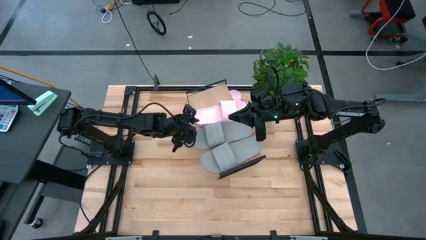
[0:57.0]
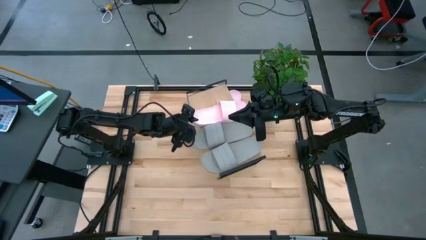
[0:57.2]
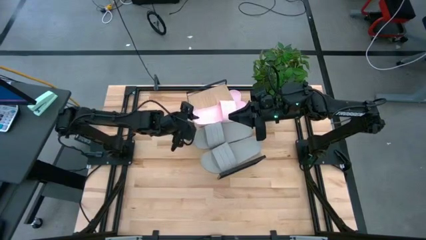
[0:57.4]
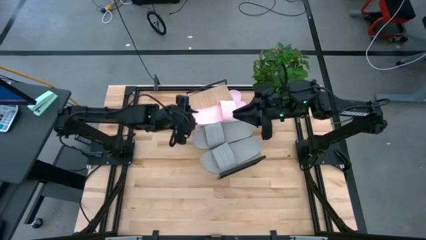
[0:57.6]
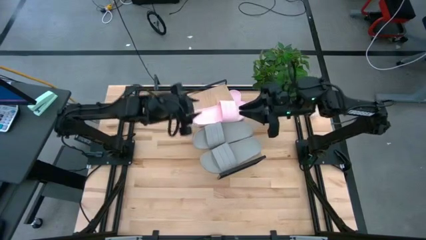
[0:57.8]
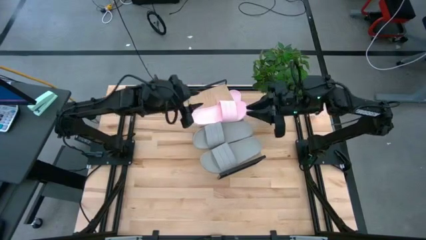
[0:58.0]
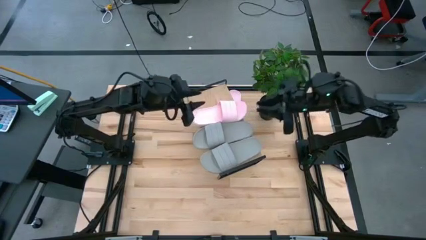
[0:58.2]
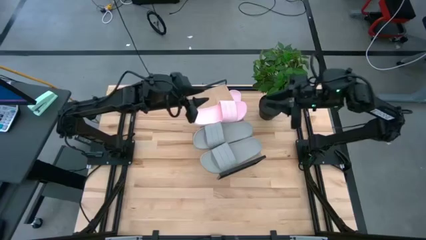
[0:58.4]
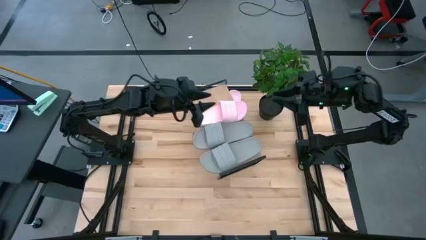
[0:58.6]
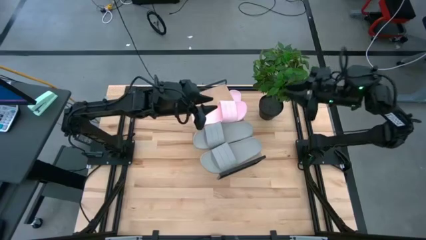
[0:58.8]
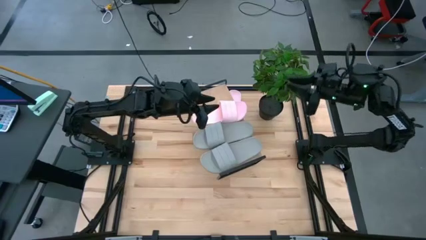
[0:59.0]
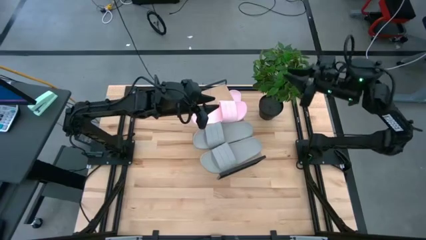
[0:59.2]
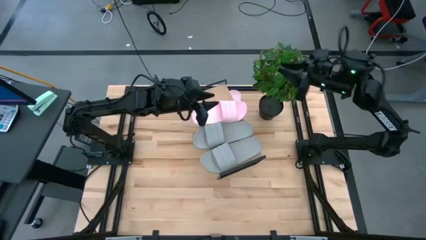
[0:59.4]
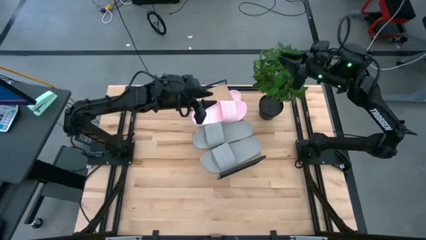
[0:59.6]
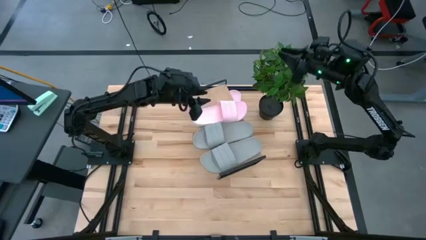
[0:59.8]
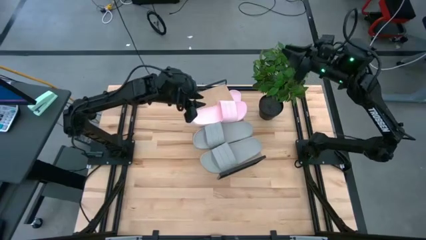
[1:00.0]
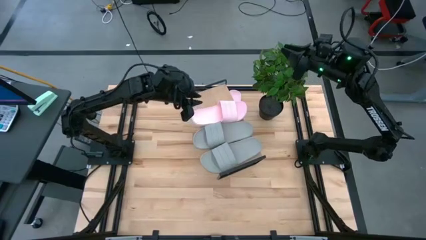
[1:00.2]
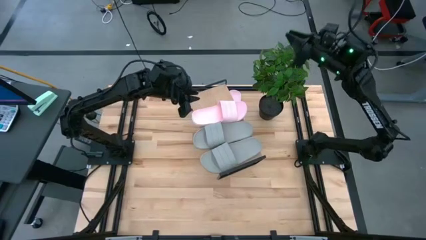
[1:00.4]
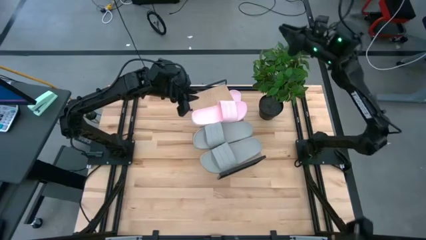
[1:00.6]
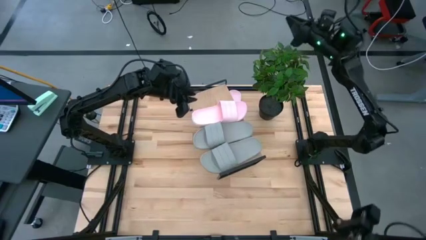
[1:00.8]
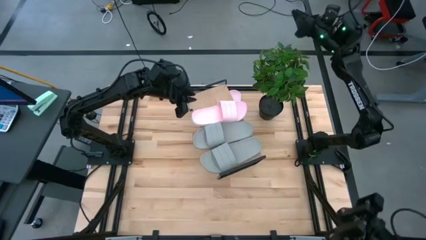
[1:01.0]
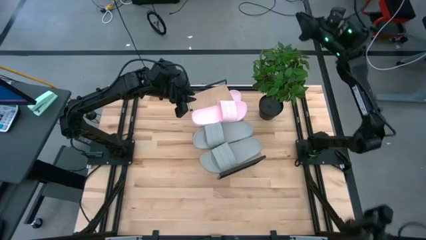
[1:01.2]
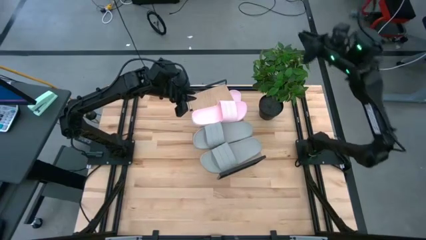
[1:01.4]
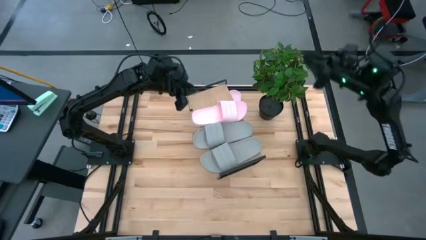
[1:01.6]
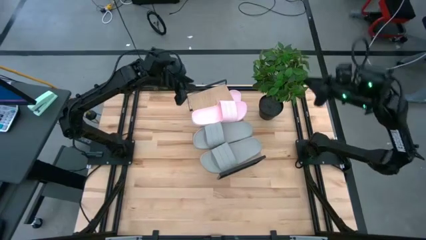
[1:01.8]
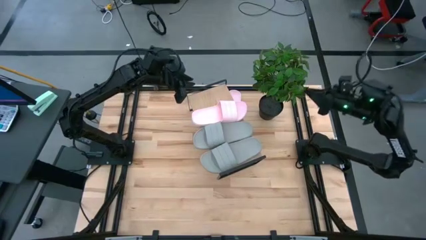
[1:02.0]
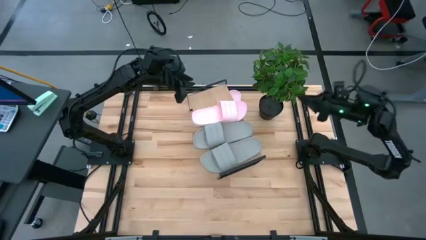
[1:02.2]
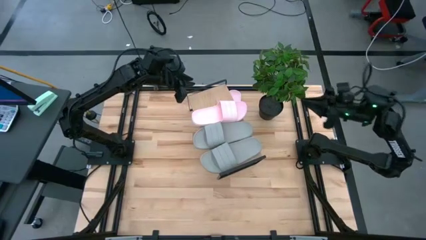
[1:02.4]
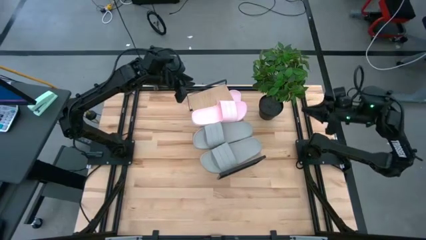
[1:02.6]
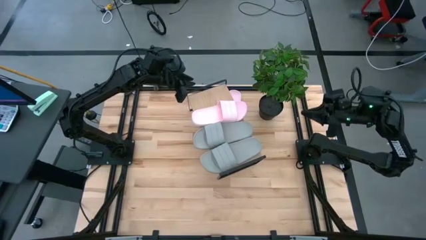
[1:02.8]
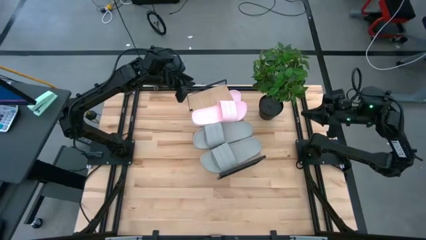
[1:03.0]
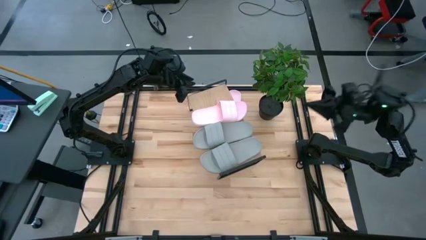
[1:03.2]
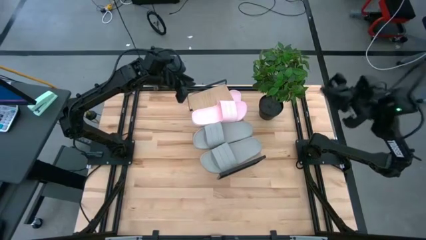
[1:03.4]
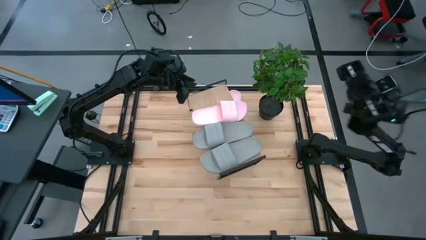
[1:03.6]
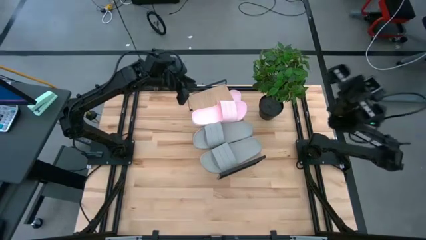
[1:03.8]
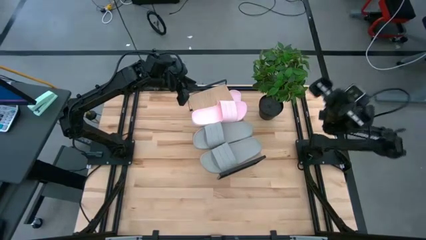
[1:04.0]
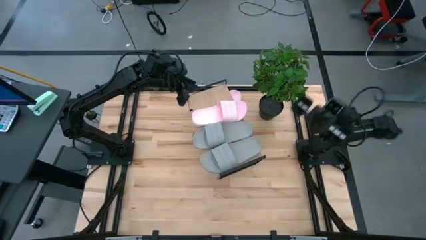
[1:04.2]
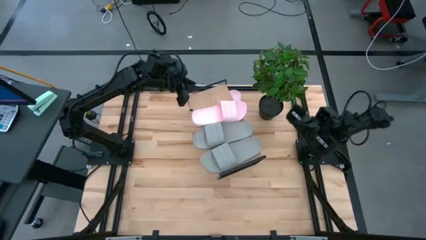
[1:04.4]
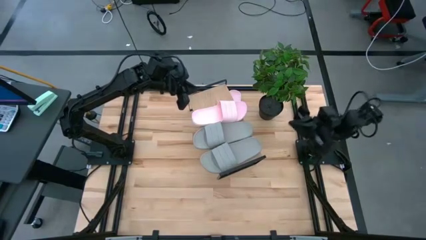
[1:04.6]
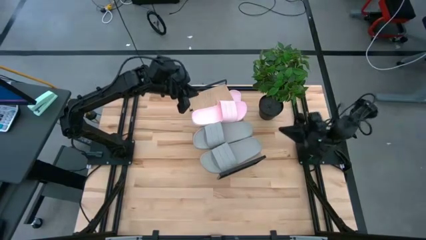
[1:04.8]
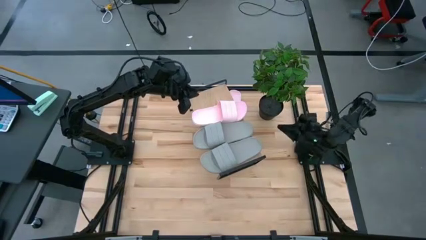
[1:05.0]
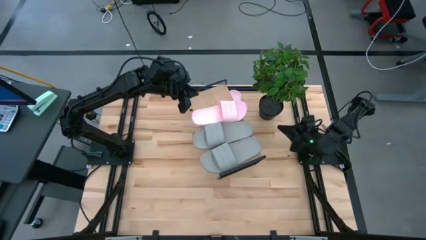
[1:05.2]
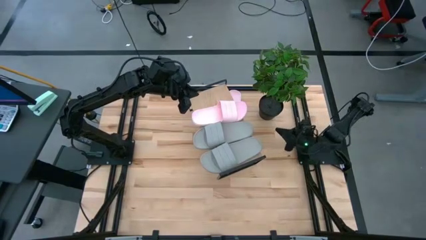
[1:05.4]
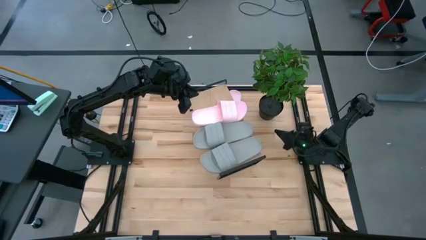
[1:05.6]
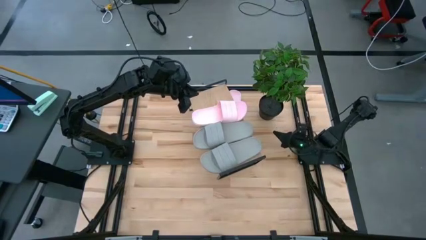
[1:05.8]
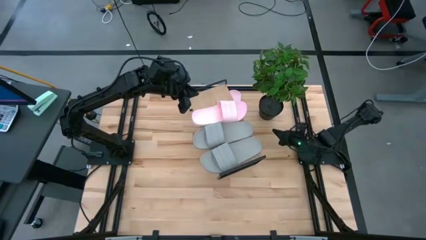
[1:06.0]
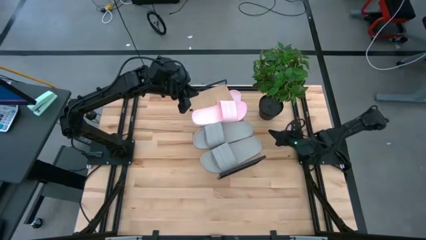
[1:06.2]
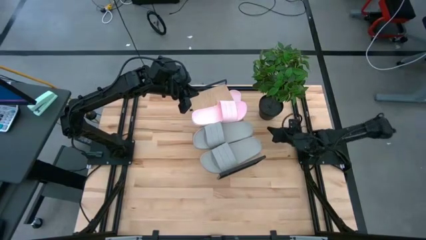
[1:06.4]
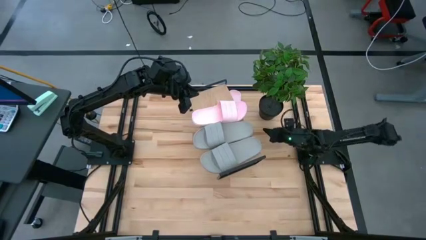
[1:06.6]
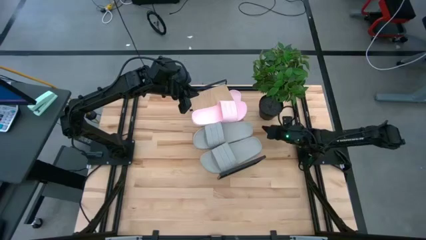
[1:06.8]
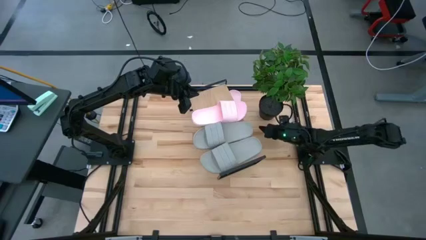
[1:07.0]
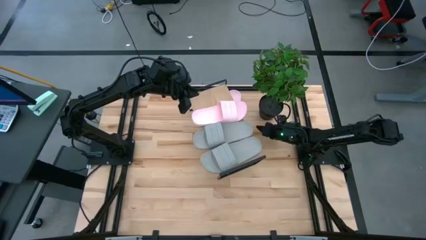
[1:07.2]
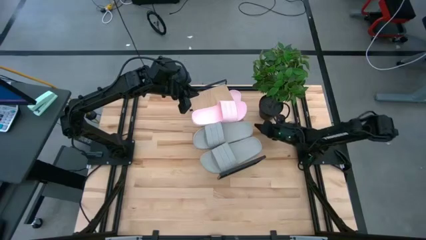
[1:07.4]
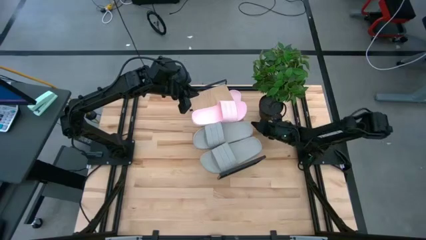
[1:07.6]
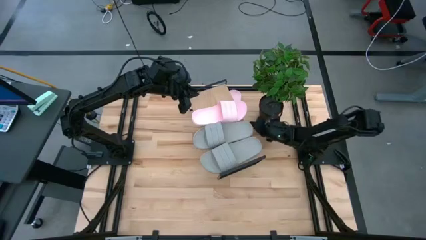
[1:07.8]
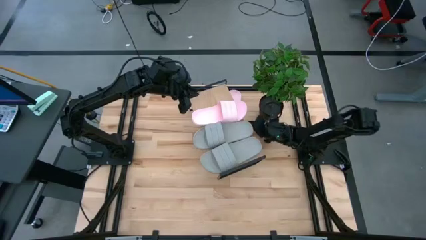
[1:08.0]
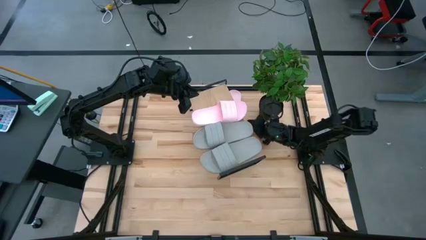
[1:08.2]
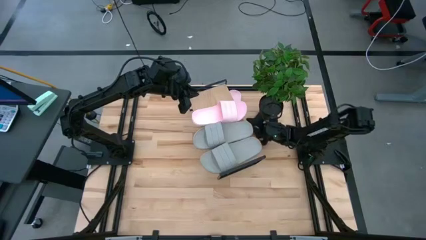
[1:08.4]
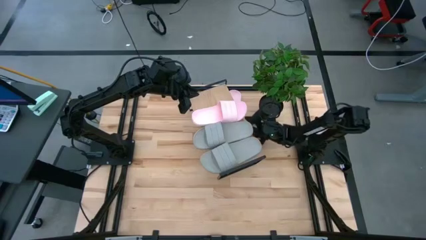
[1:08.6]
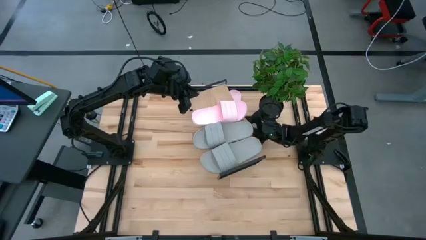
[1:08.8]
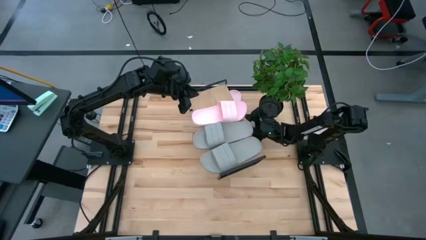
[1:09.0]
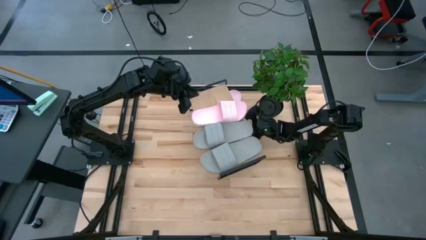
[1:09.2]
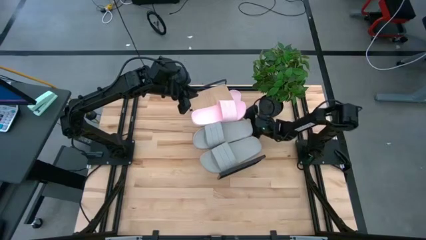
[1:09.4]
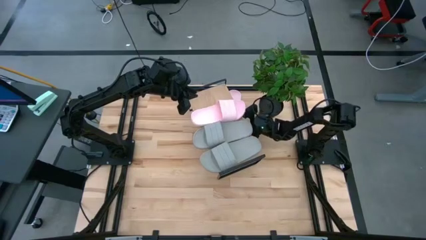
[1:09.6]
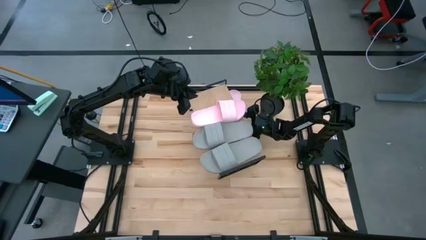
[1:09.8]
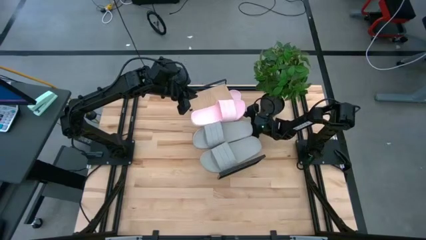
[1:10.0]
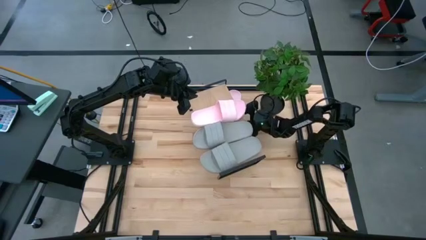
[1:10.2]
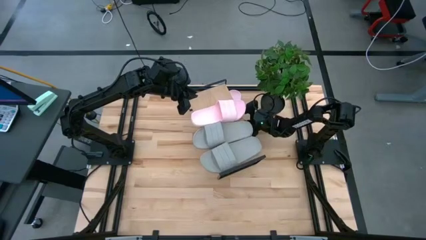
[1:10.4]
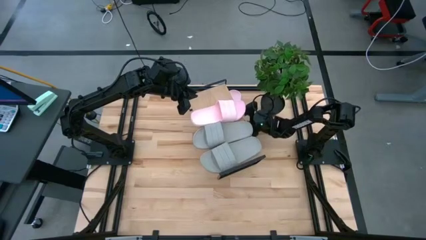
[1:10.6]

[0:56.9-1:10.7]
Task: Pick and place slides into the shelf
Put the pink slipper on the shelf

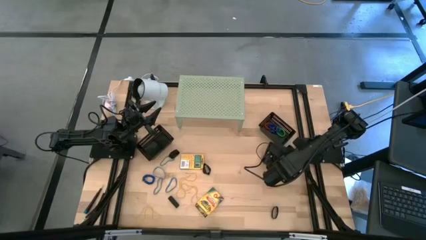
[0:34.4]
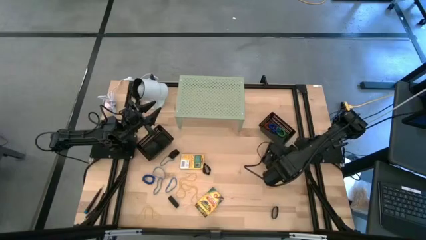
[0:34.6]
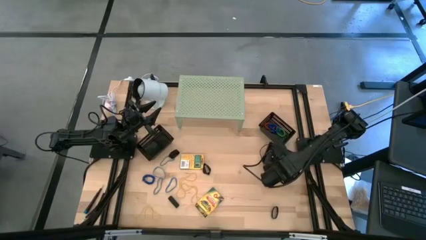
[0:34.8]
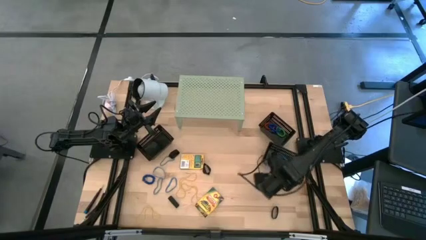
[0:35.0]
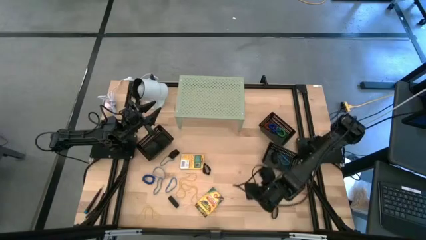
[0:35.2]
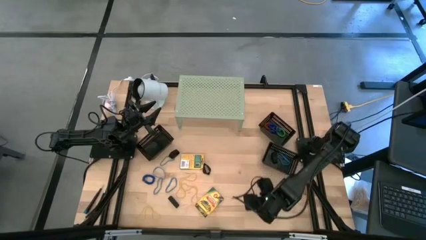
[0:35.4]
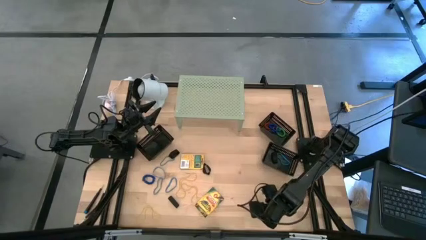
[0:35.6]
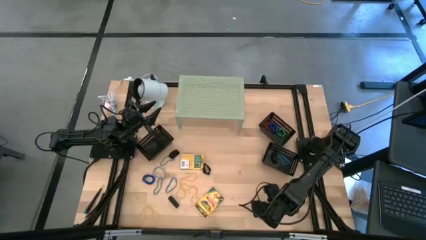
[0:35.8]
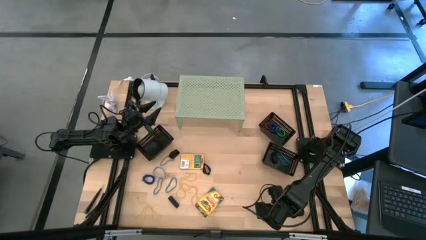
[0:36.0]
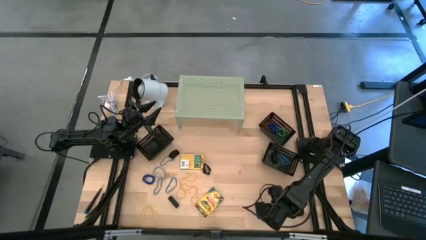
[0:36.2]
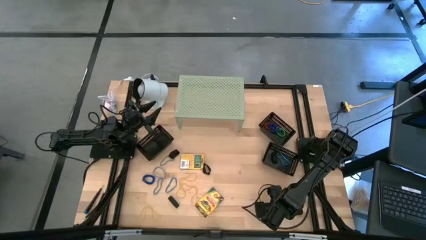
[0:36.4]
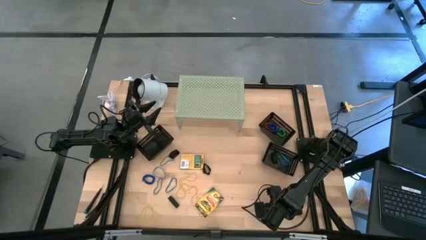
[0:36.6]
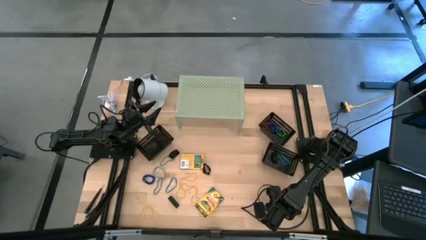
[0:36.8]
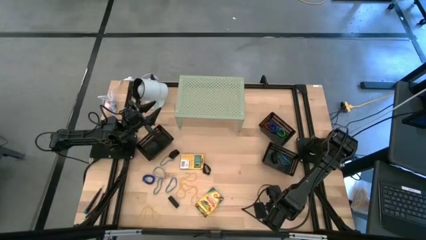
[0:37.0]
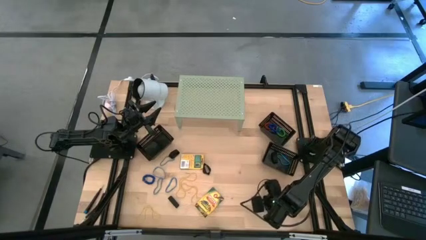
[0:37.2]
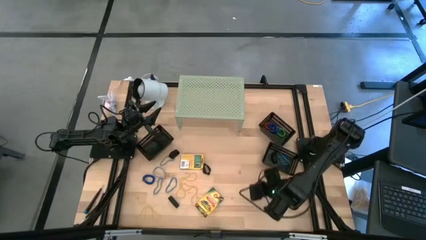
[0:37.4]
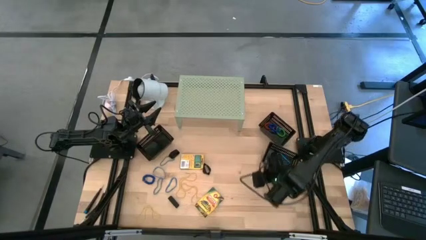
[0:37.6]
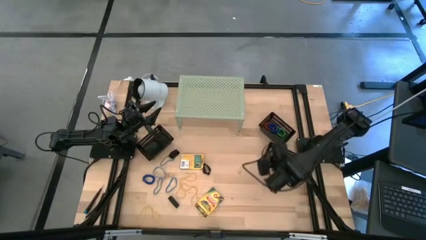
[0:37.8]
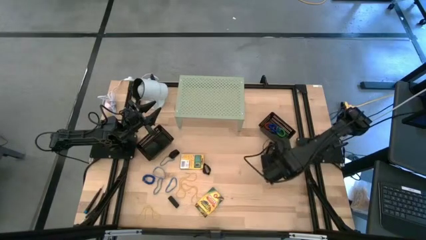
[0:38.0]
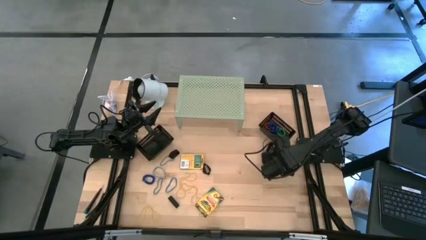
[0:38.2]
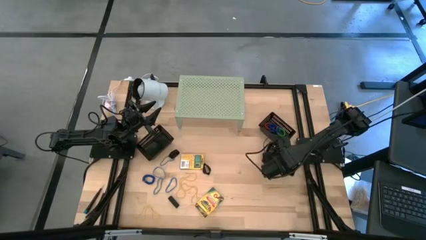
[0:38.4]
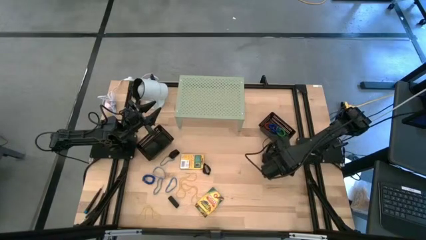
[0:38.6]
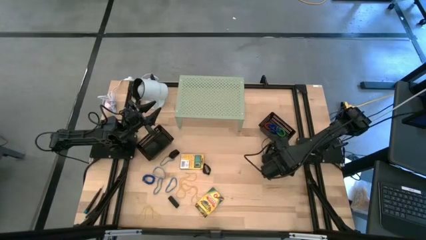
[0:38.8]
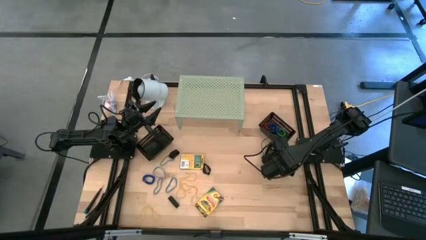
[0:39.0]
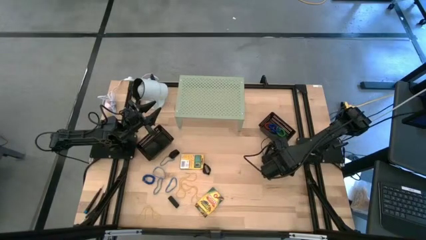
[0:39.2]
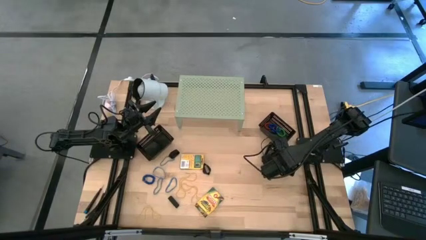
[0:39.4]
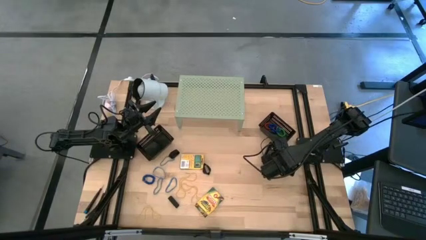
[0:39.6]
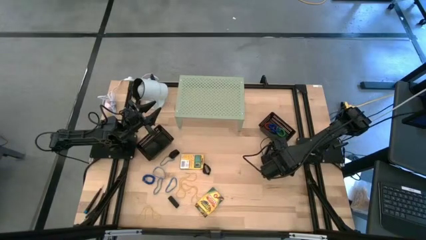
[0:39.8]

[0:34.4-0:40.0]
Task: Pick & Place Office Desk Supplies
Put the black rubber band into the bottom right black bin
